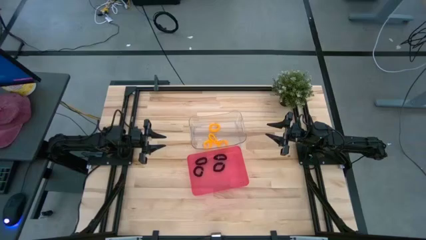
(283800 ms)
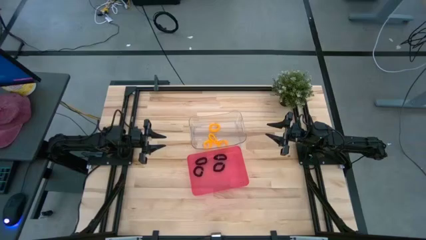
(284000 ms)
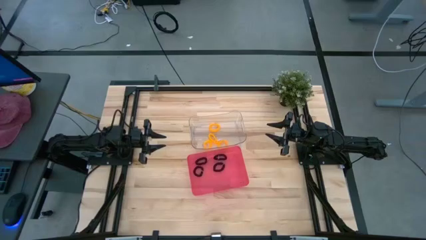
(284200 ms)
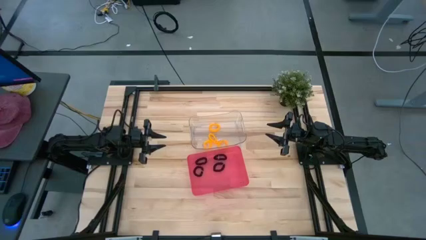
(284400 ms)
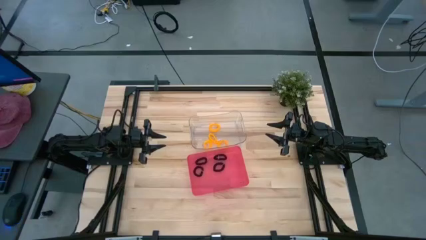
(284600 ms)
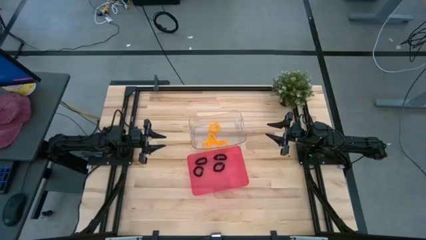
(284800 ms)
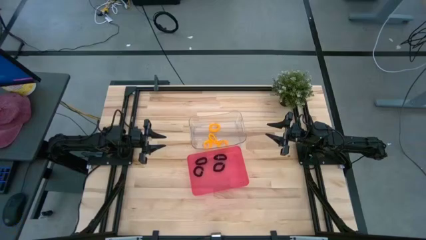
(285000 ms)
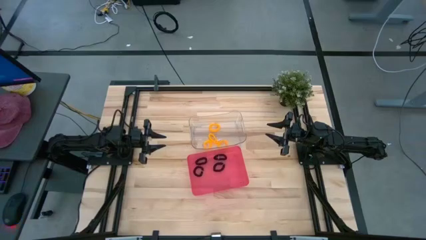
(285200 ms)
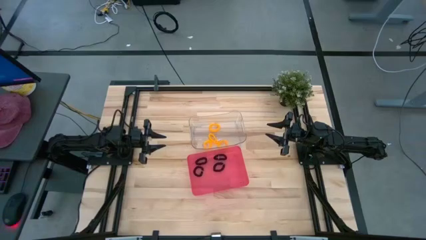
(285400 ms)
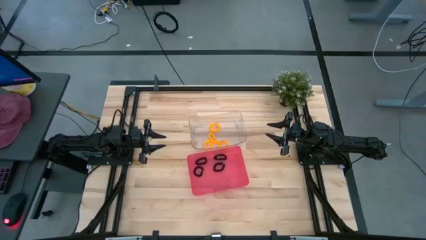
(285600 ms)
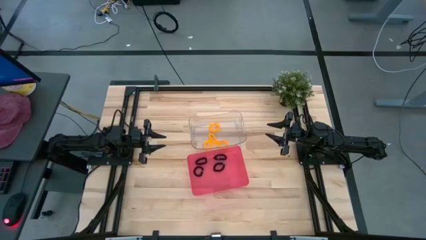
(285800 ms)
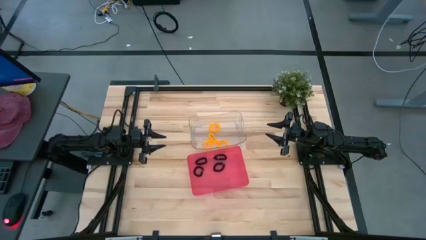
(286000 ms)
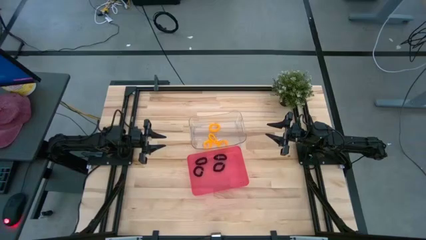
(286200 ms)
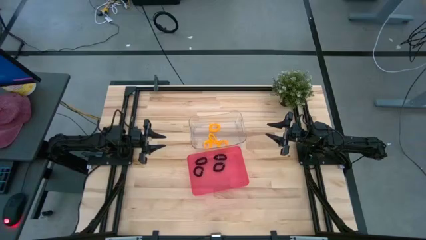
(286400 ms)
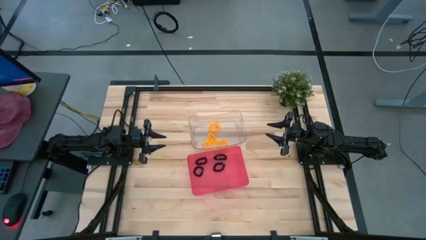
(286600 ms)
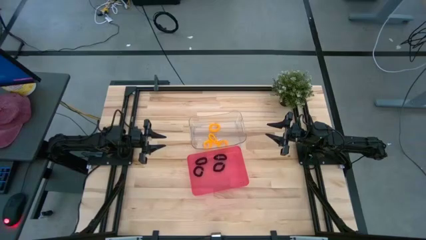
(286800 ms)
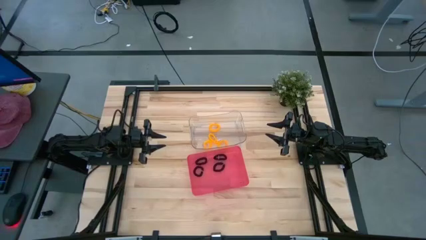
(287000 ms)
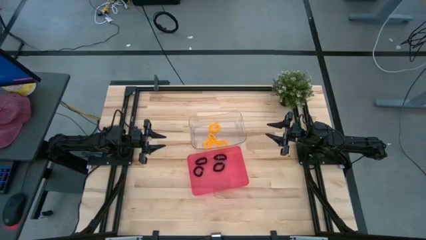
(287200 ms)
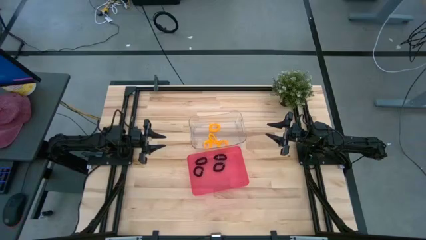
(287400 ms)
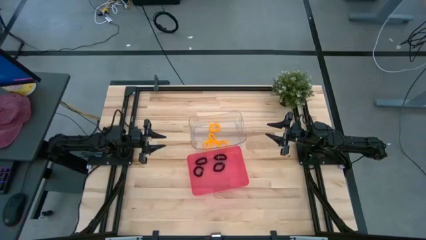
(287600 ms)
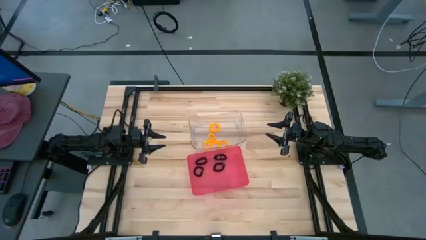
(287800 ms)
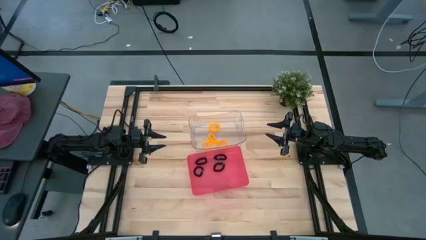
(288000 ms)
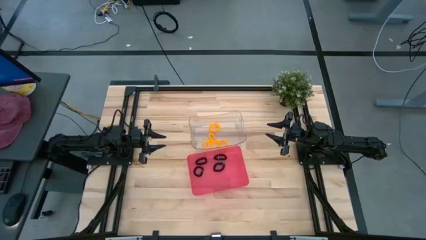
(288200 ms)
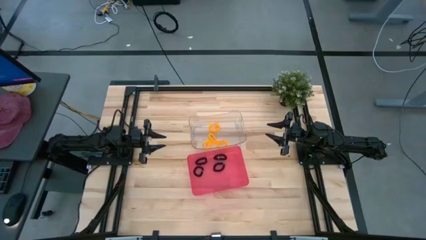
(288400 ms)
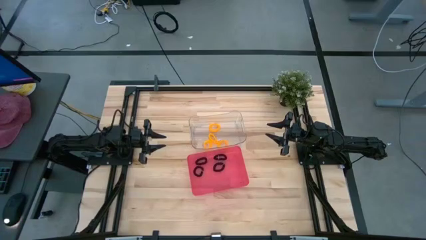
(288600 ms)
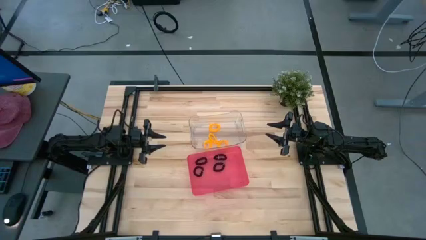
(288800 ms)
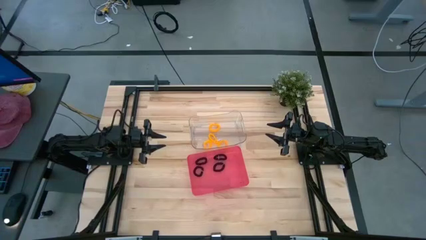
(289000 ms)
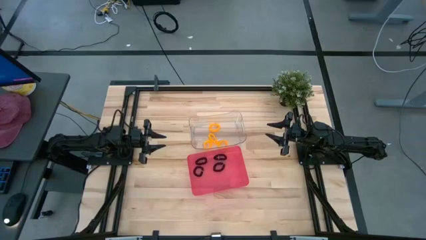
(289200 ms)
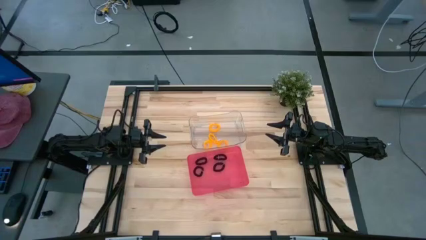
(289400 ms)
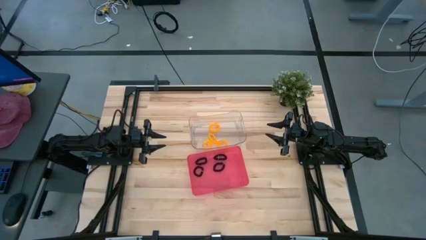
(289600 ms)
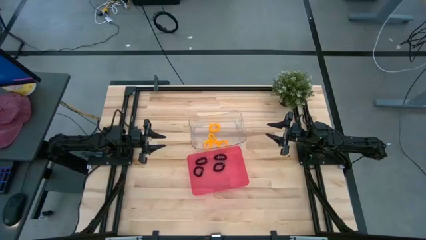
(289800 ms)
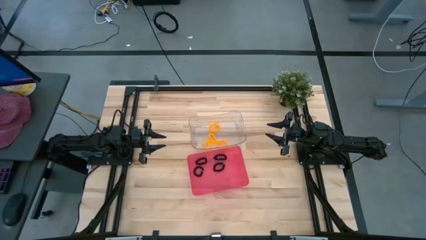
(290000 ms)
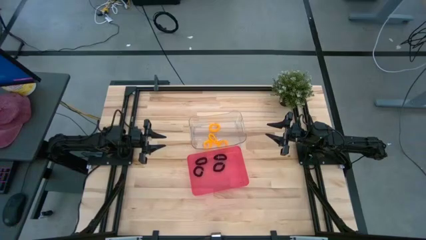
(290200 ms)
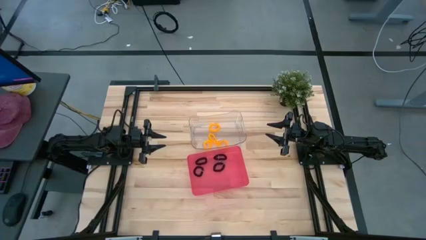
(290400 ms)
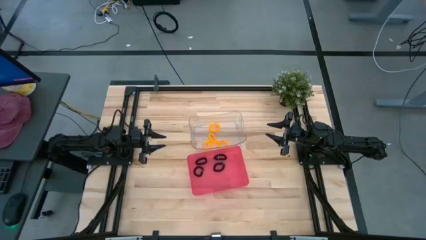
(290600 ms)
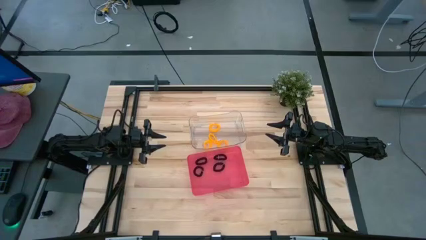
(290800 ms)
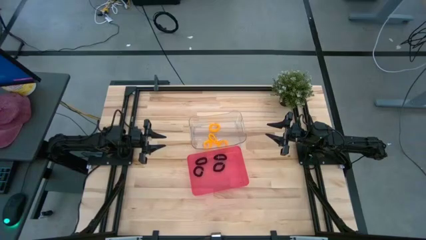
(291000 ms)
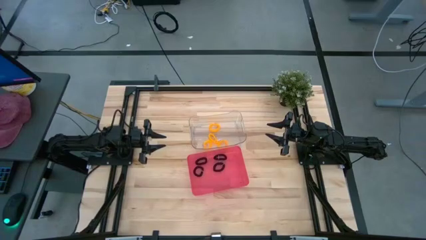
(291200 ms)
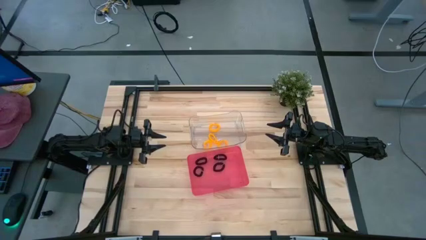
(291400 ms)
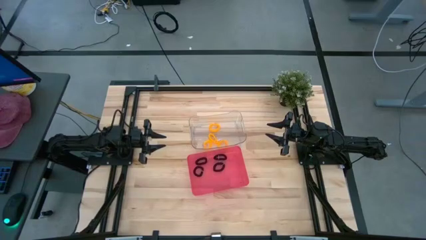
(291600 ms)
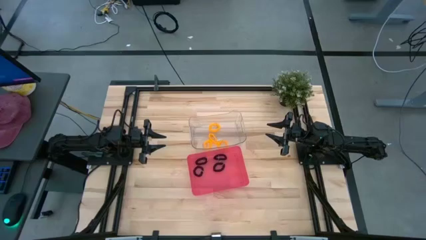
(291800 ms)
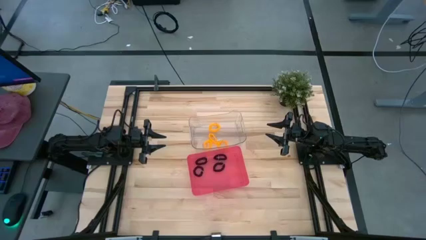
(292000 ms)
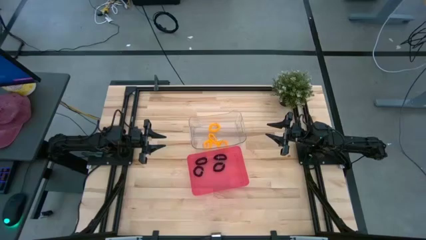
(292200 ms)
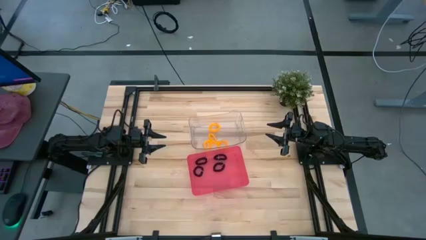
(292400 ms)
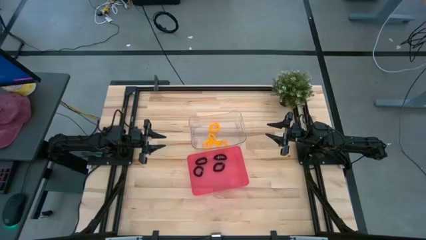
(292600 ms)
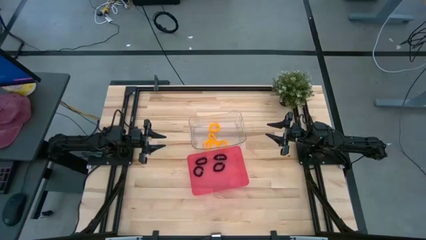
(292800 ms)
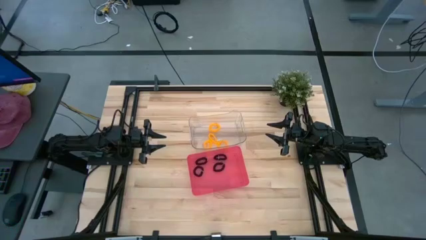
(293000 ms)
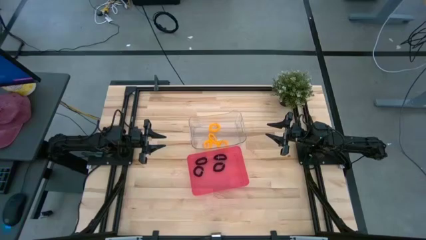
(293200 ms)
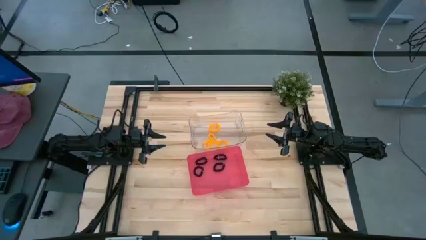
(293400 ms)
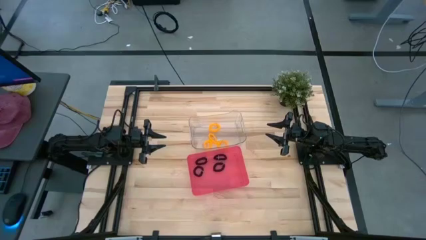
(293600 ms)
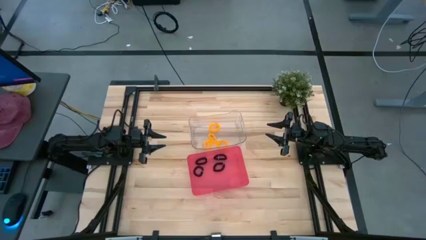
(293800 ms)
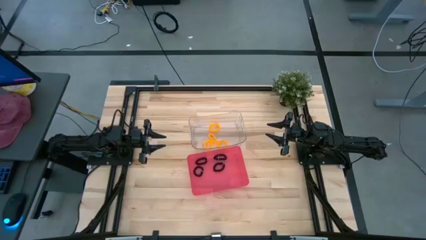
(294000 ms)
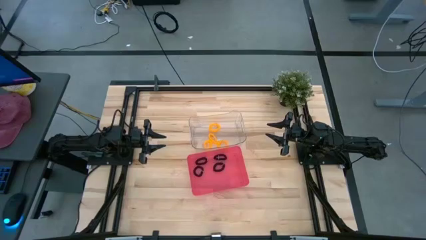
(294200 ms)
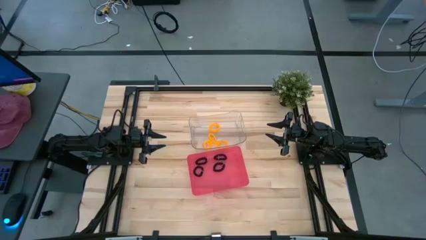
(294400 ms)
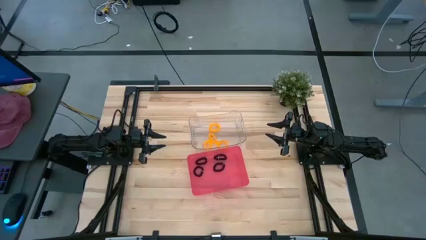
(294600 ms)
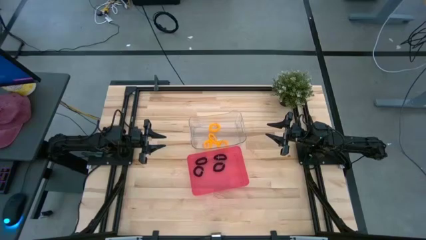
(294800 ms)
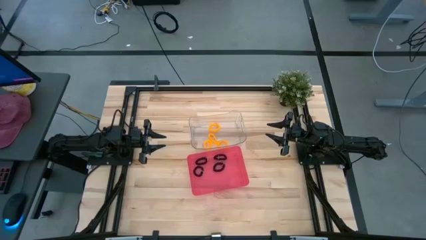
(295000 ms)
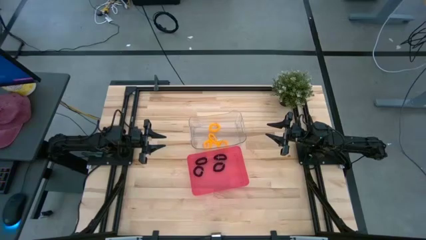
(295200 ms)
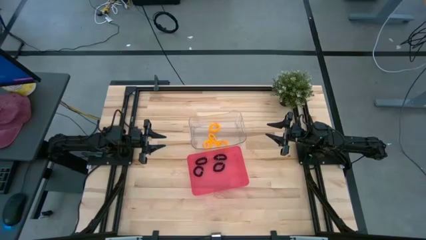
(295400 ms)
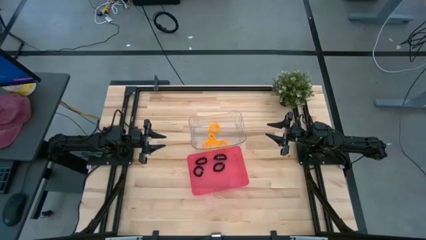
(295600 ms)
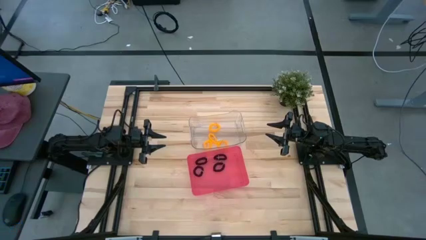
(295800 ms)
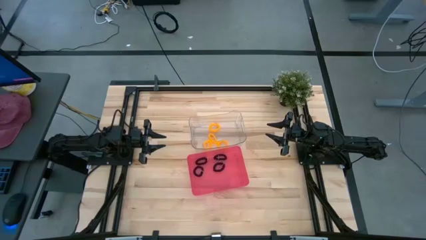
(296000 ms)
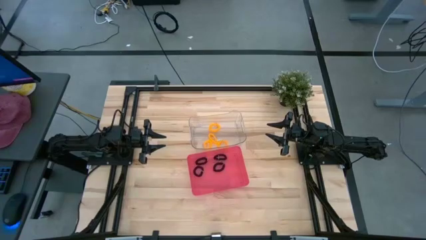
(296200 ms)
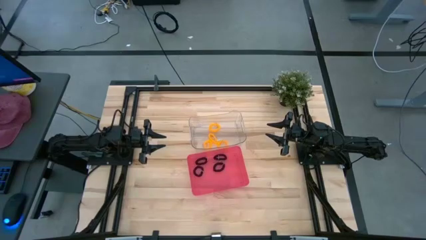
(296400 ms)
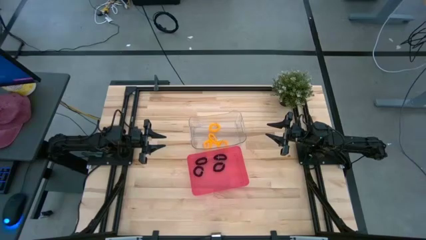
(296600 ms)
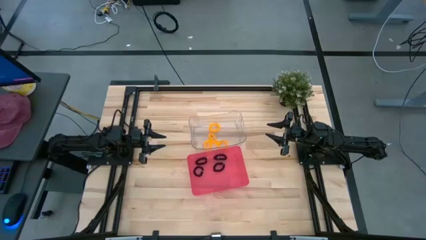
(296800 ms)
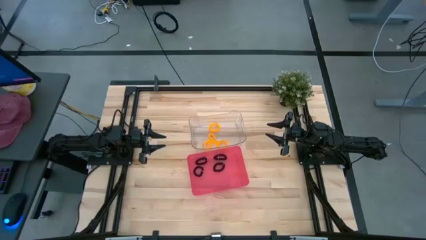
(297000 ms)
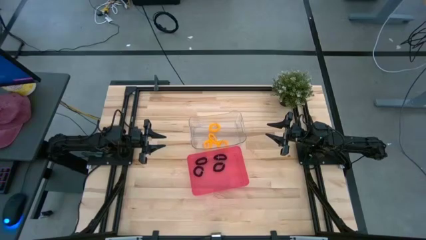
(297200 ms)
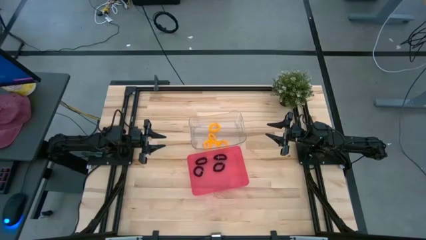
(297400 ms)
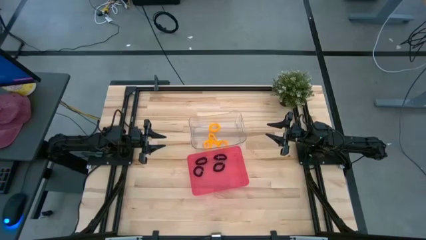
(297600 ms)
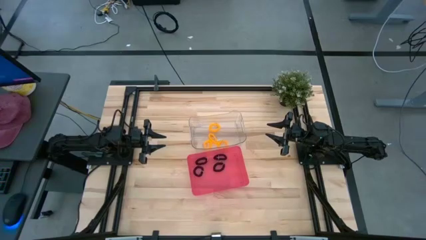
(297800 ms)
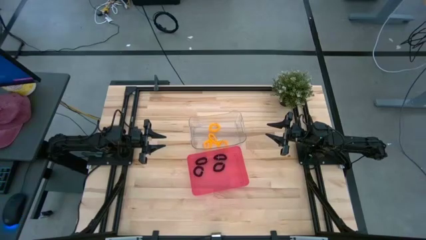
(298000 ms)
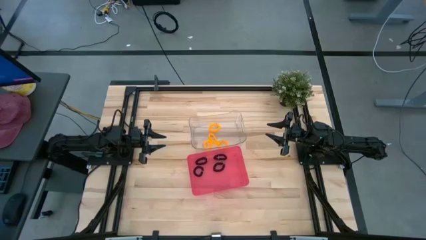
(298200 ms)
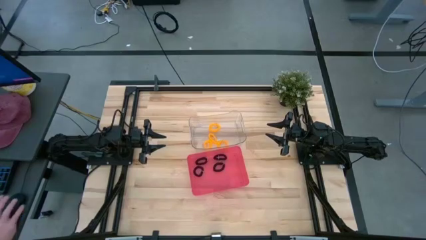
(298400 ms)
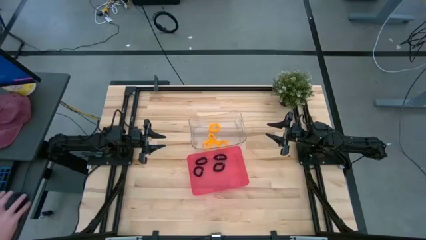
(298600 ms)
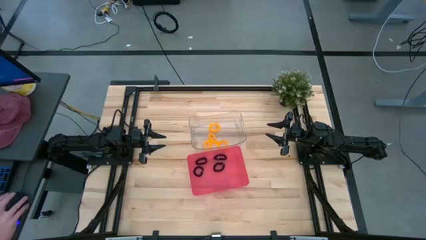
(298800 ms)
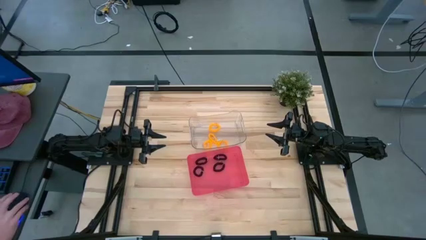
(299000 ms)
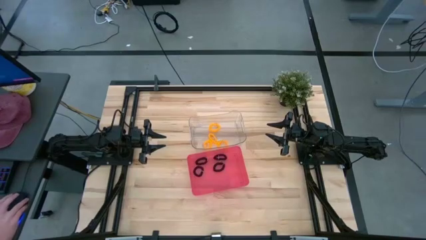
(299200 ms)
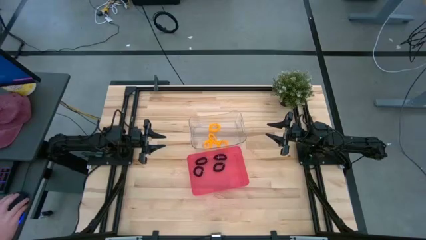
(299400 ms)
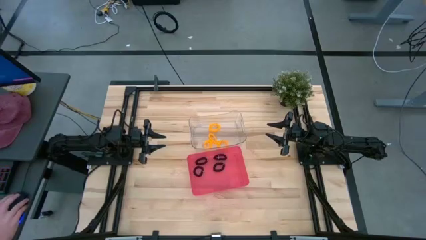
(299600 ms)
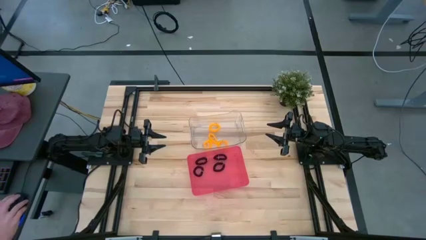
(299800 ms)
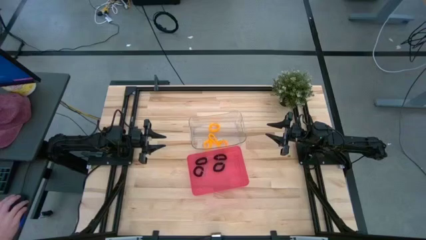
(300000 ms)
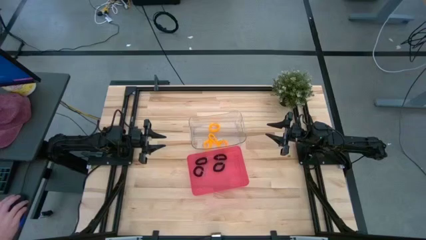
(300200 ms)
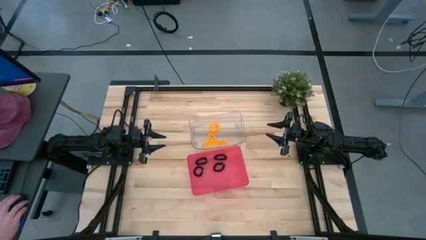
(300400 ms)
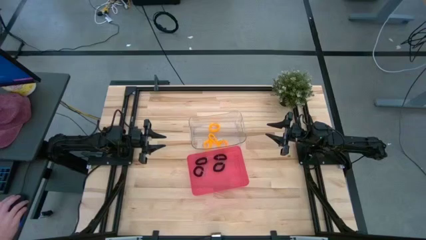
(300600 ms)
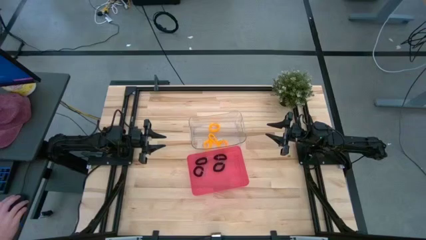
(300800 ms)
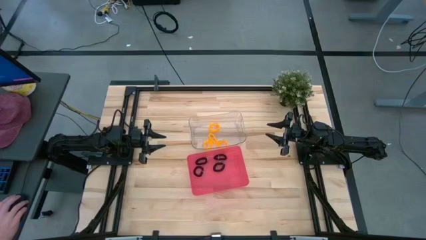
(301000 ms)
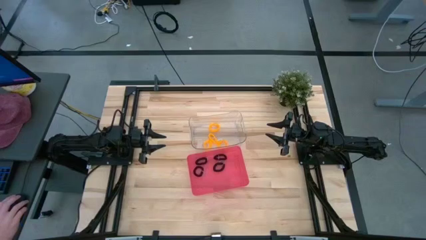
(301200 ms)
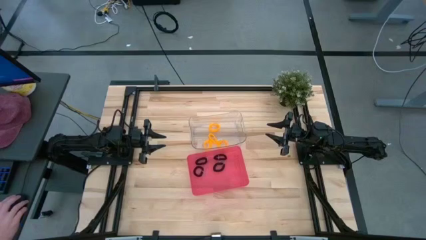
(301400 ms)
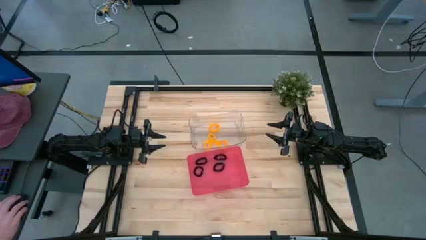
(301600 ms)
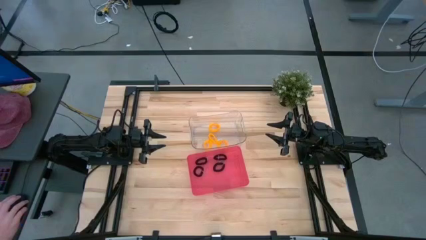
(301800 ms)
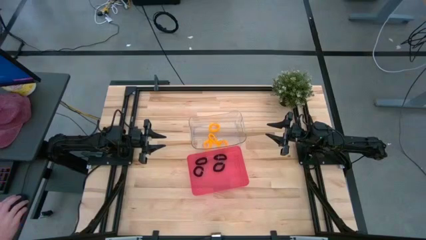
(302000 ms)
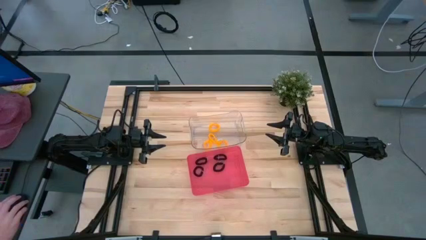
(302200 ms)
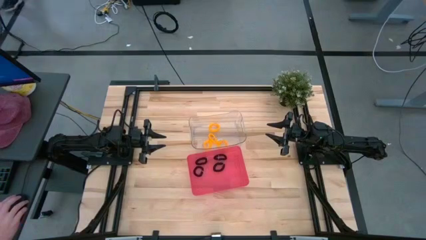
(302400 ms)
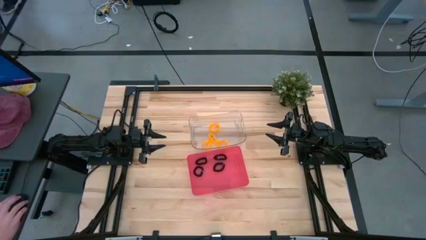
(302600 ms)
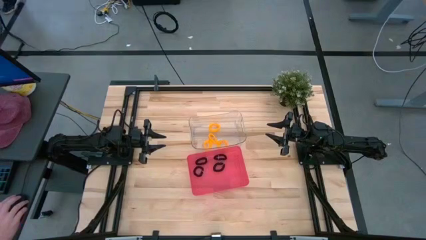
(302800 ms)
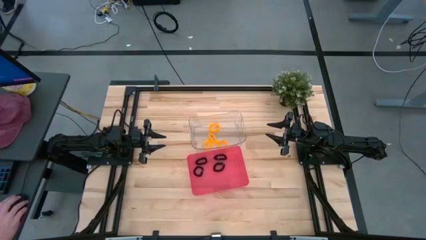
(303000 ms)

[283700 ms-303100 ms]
Task: Sort spring keychains
Return to Home Position
